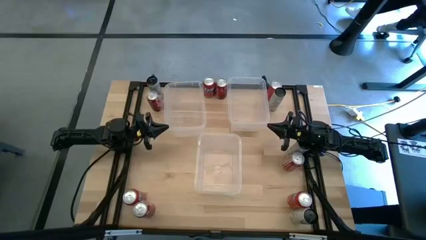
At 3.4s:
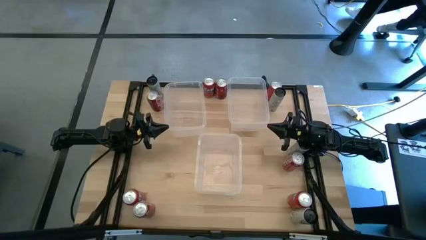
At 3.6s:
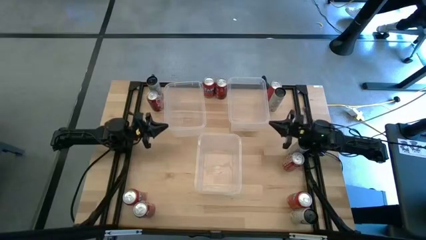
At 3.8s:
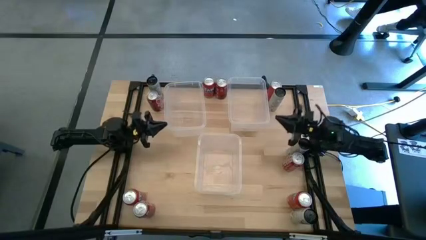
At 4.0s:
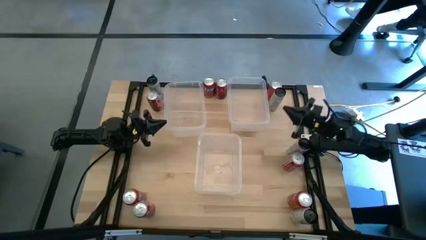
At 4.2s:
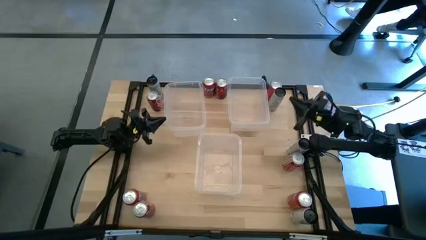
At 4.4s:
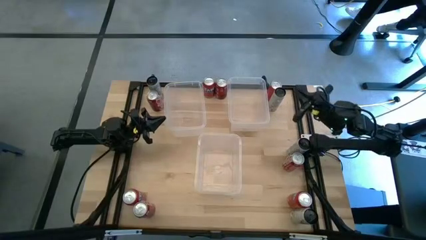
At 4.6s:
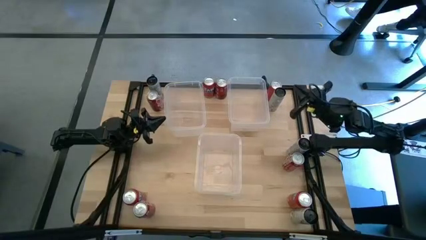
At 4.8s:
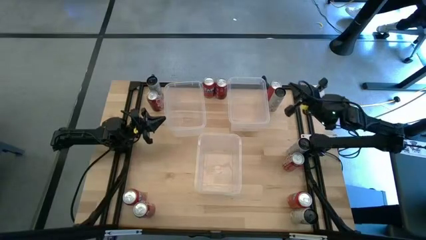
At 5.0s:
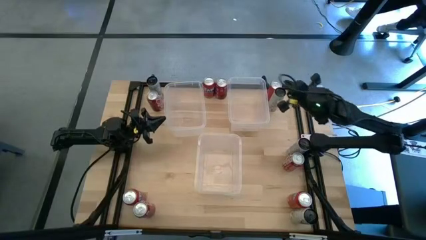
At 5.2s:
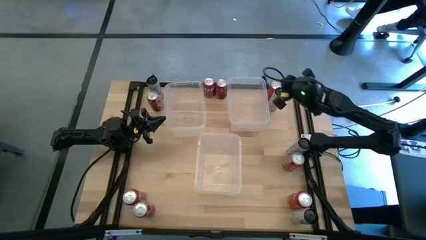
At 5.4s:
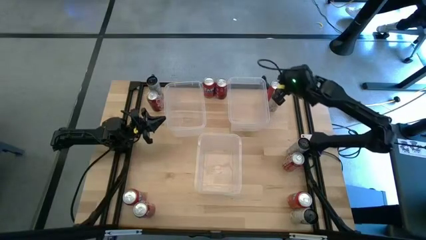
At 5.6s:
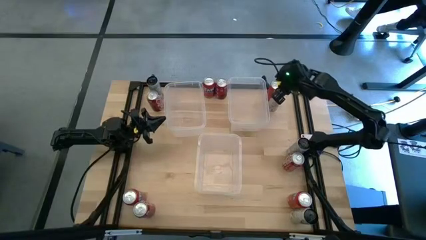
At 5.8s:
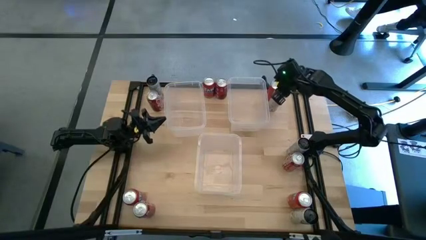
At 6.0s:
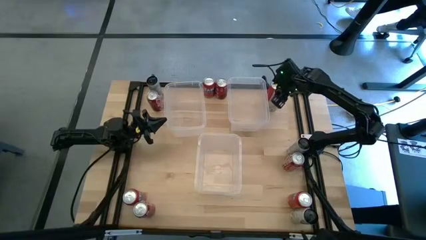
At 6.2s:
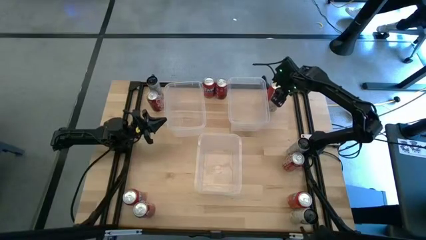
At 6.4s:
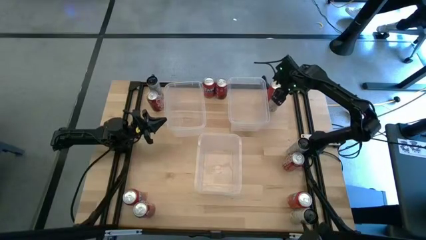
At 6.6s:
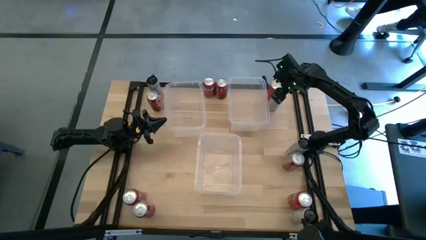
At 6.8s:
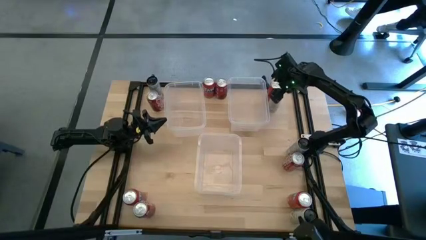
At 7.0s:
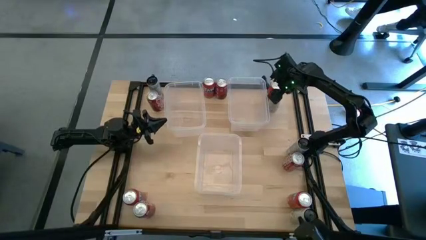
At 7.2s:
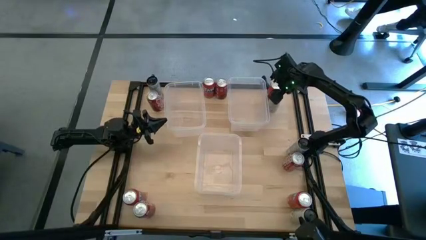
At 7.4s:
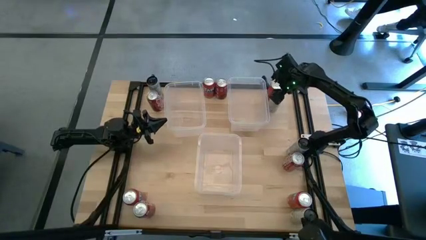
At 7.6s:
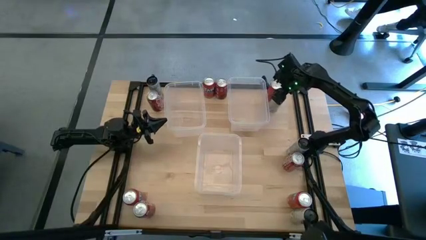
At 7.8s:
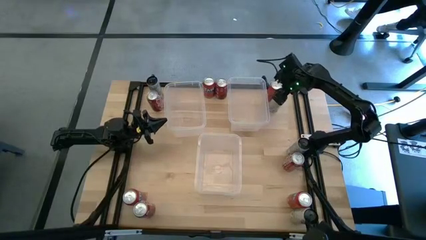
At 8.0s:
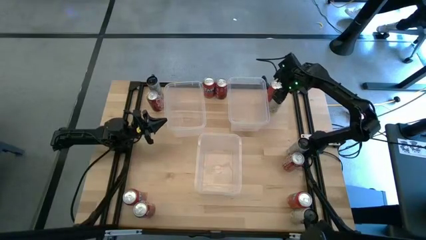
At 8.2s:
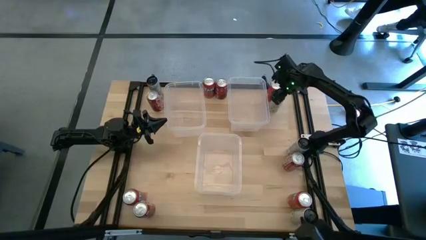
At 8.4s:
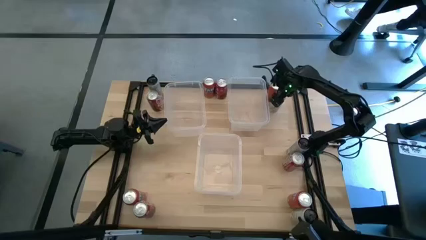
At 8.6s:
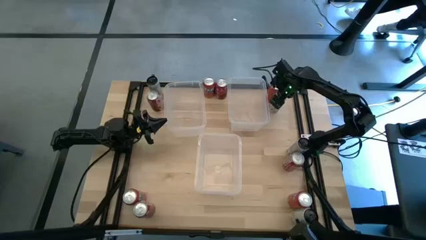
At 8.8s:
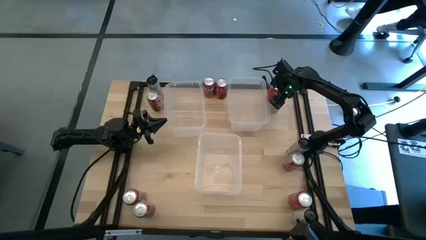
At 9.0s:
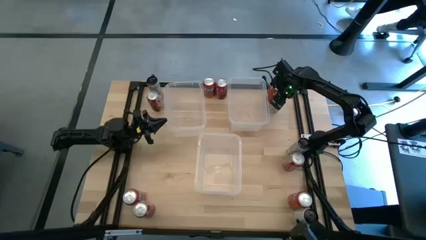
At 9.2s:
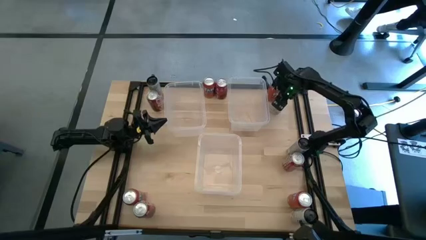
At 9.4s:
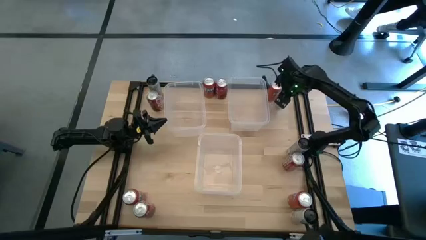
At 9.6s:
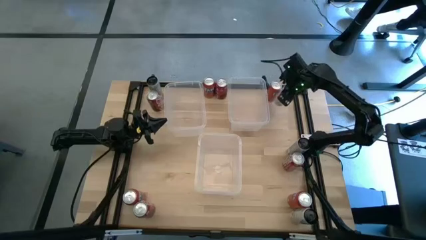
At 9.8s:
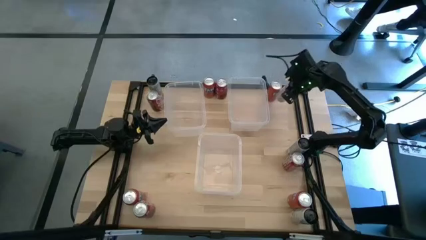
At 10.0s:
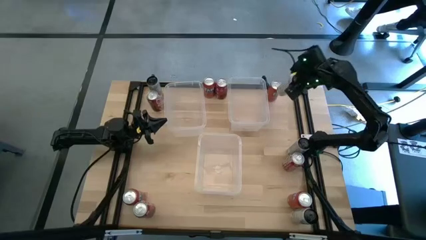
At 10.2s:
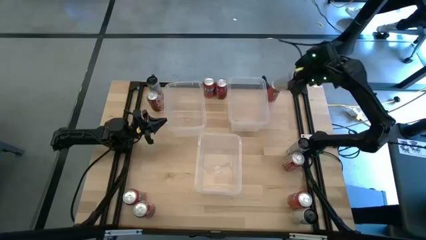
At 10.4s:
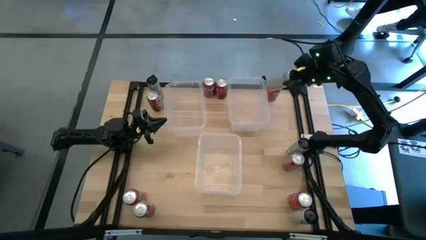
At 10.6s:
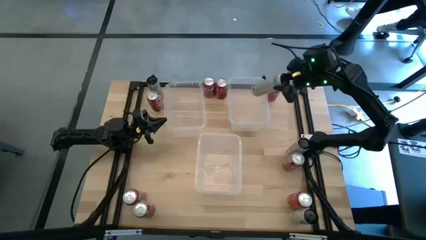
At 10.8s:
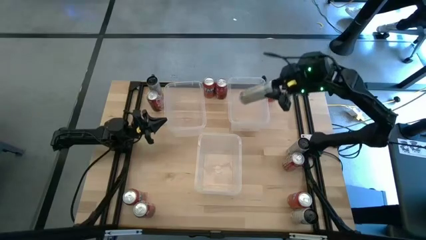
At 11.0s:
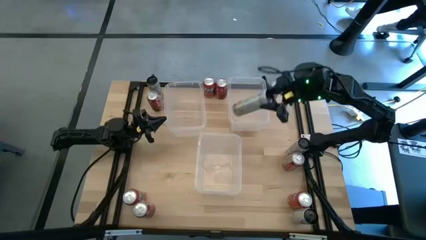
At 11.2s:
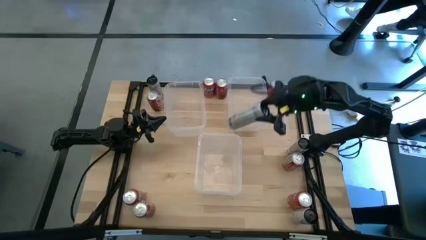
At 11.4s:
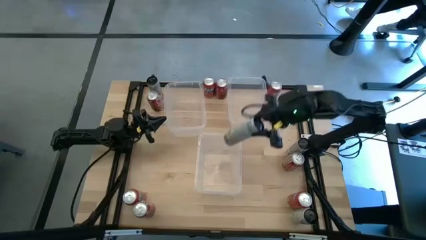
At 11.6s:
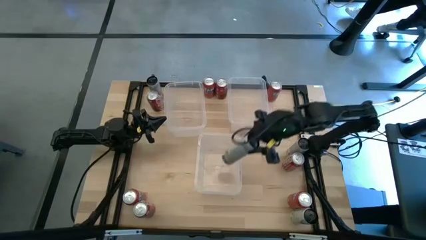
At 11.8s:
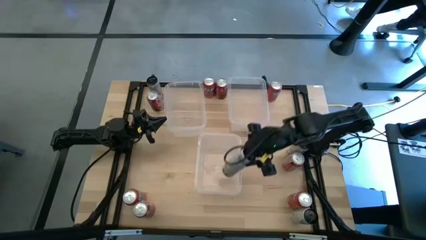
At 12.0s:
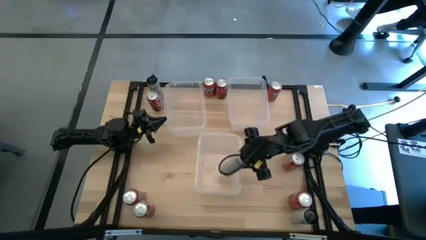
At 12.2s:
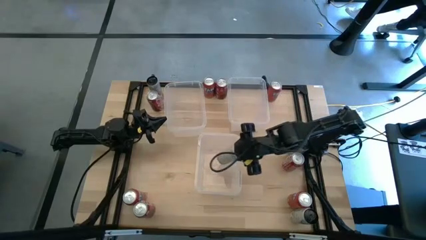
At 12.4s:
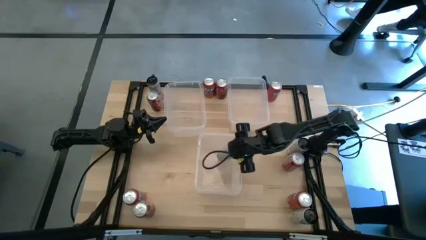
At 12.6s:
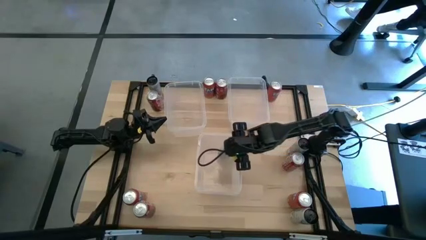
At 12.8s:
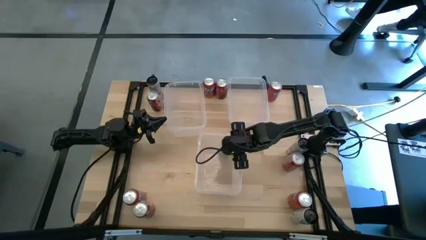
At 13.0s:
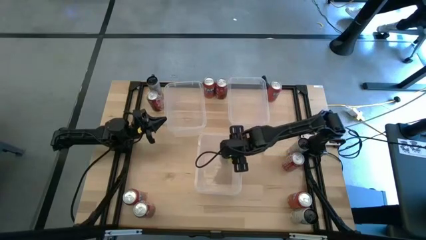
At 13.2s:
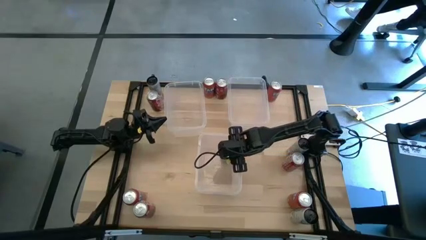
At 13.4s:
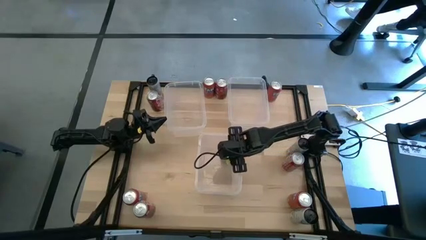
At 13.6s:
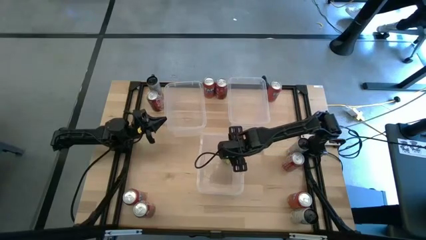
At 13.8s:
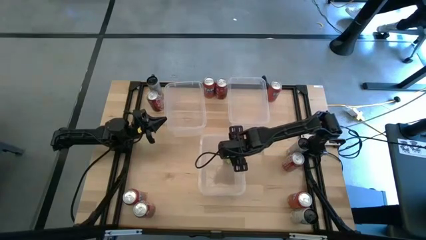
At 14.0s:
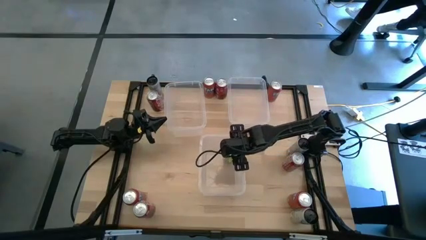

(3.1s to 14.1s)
Task: Sort soda cans
Put the white/yellow soda can into the bottom transparent bin

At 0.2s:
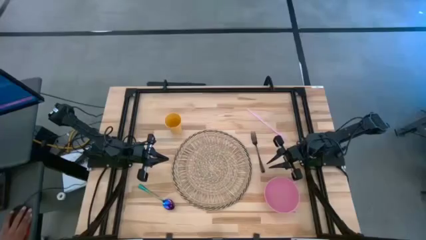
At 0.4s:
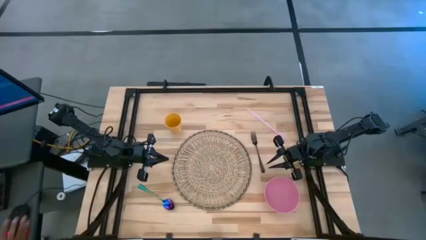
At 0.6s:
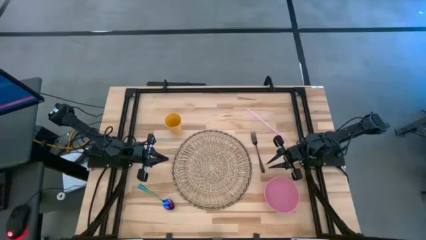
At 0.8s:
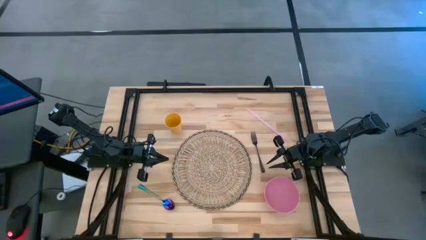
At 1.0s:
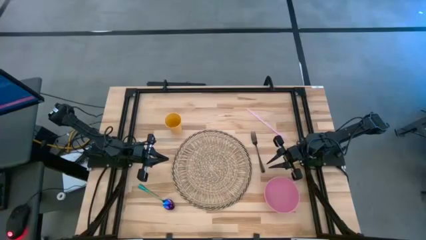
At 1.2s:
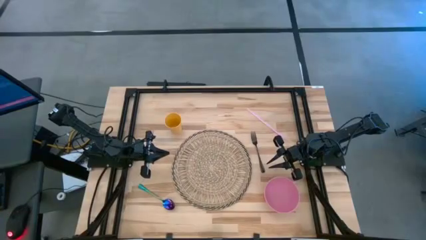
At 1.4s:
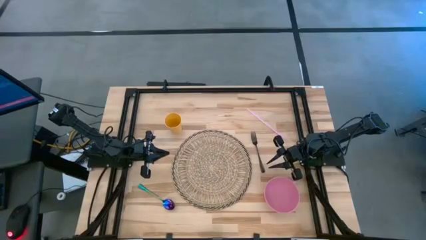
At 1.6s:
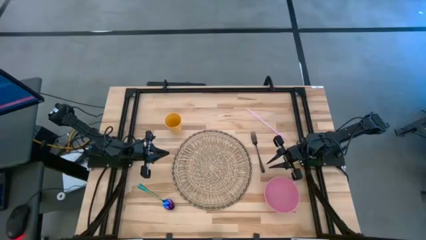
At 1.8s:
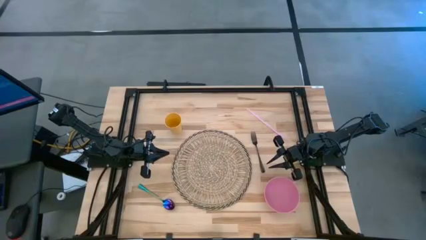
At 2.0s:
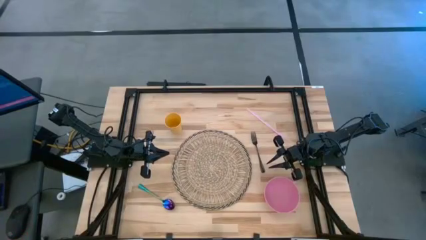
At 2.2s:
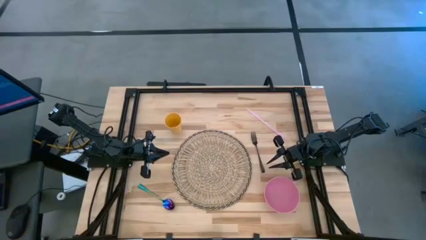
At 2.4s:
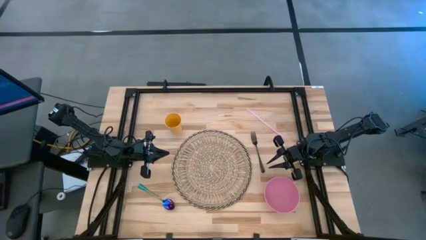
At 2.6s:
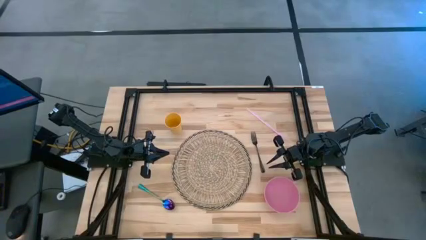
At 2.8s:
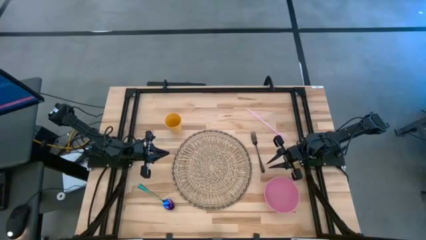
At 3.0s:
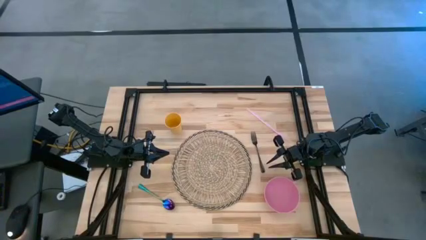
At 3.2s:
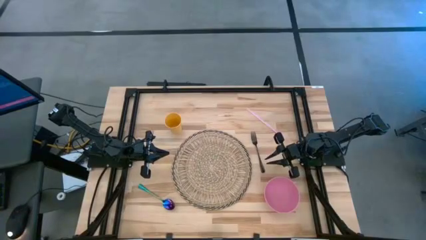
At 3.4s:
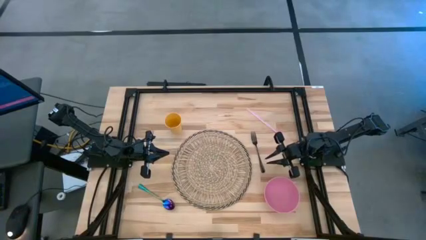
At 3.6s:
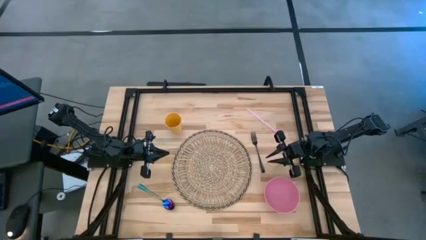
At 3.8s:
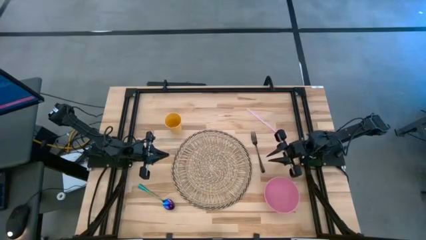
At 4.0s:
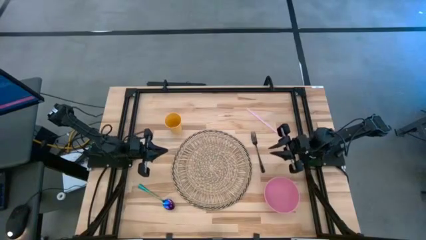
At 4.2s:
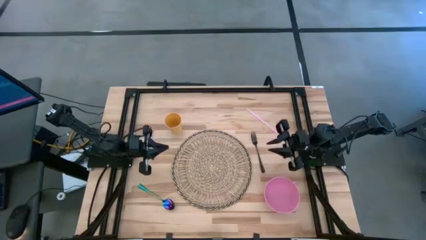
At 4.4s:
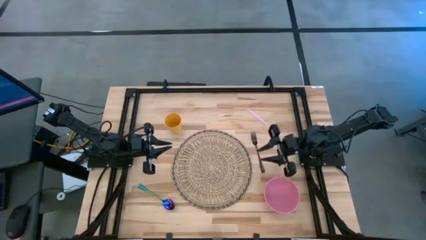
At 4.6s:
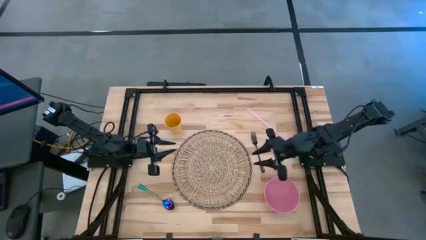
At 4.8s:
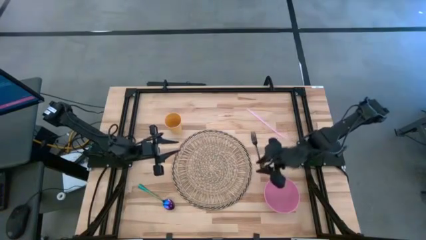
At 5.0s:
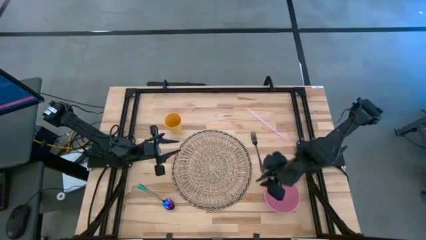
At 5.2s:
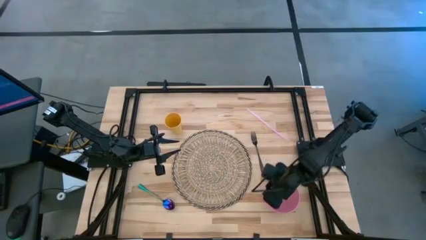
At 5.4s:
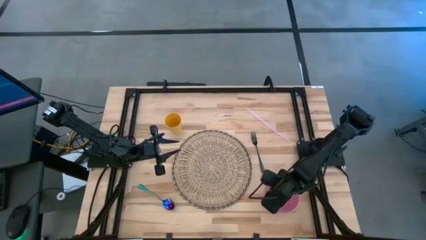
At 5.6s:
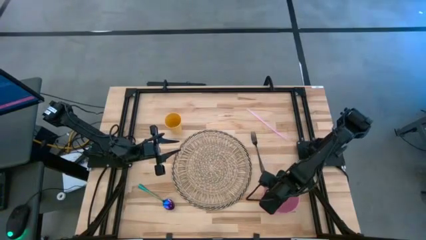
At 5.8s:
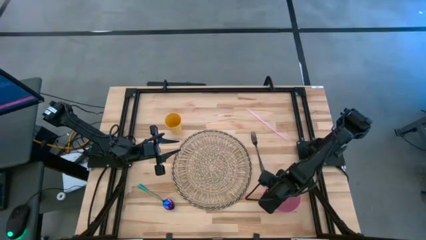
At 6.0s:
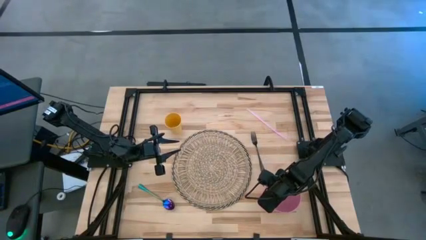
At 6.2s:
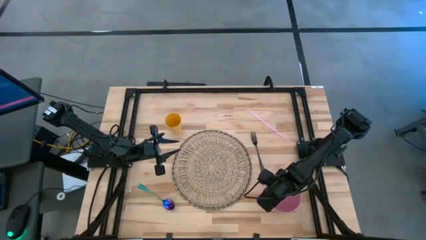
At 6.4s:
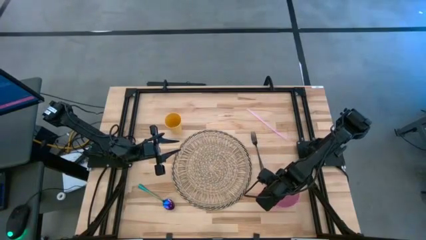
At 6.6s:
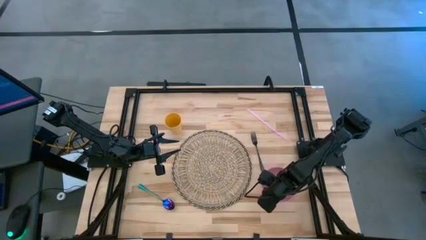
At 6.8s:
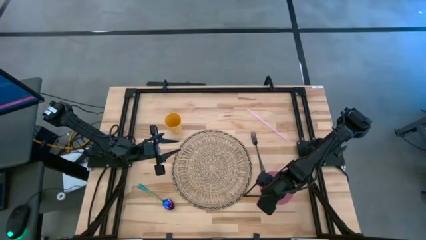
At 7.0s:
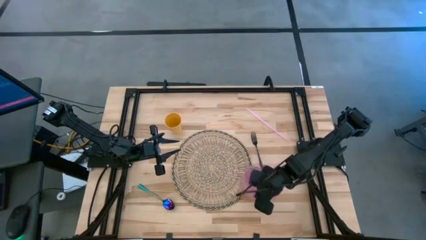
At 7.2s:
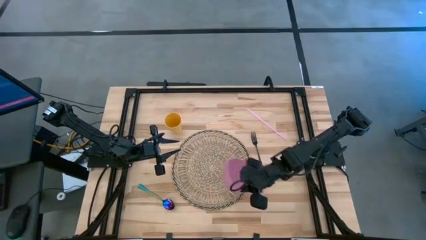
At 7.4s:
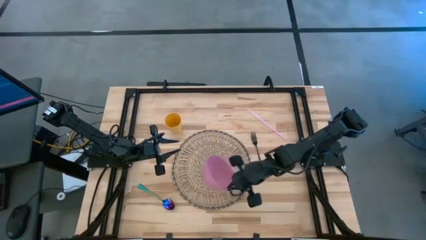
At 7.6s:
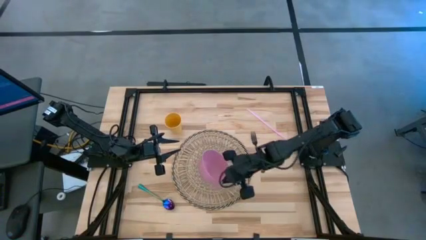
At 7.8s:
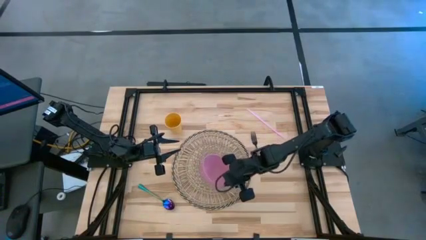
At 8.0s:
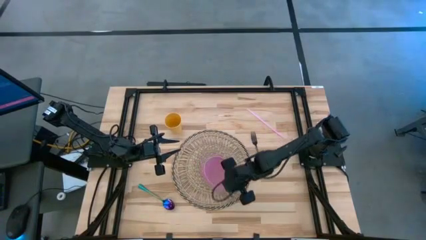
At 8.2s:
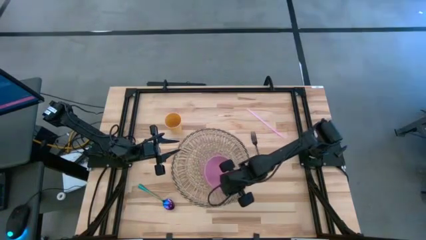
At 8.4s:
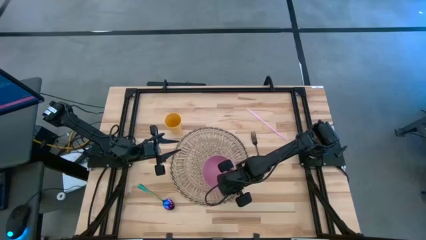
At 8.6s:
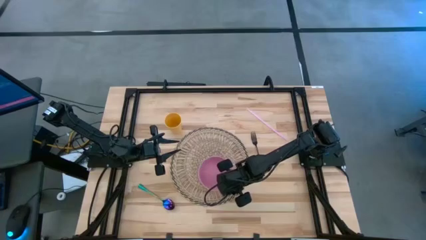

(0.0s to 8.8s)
Task: Pick & Place Utensil
Put the pink bowl in the center of the brown mat
